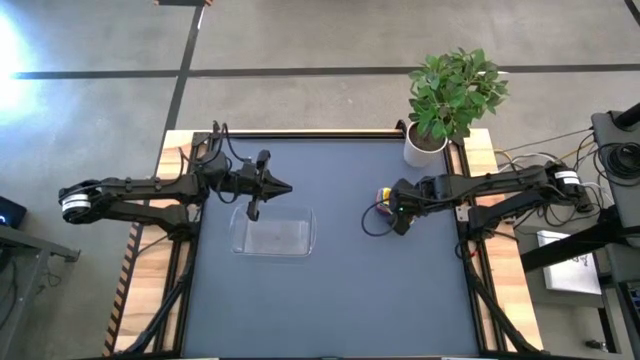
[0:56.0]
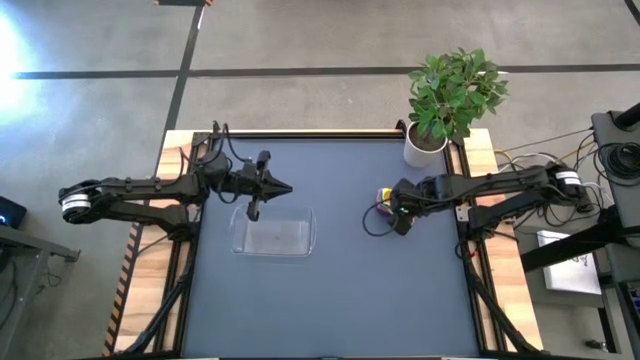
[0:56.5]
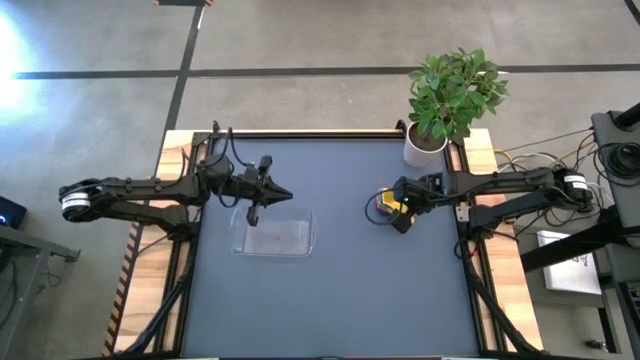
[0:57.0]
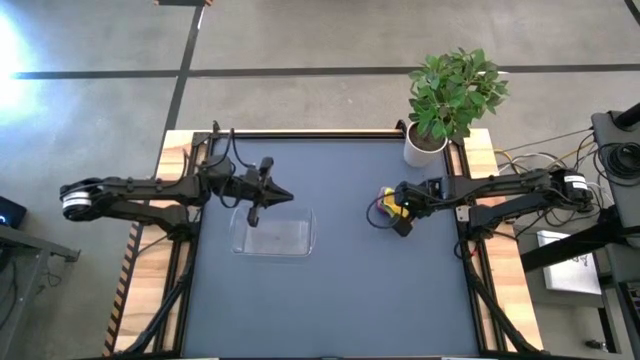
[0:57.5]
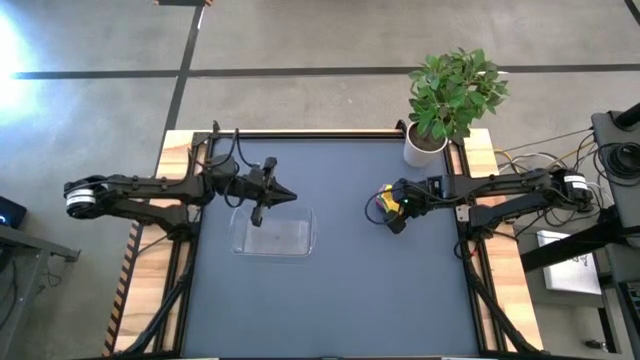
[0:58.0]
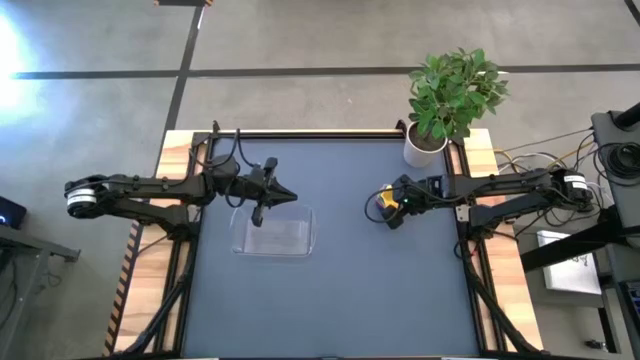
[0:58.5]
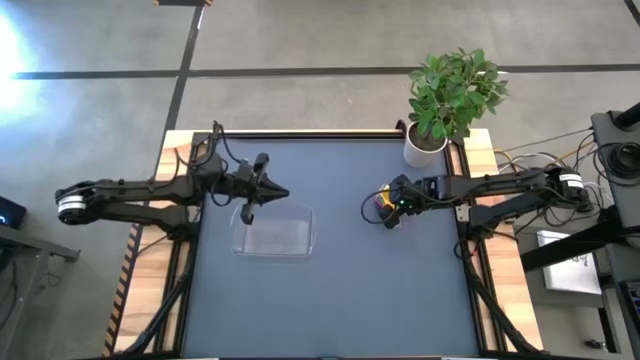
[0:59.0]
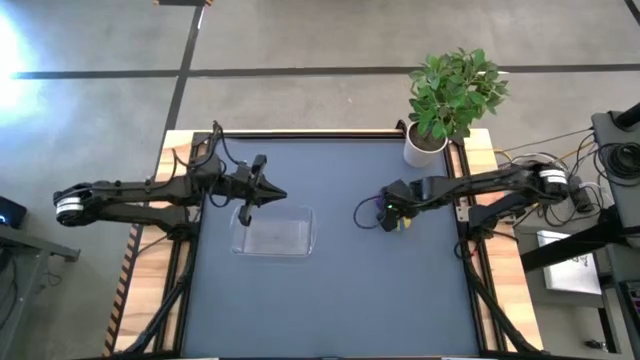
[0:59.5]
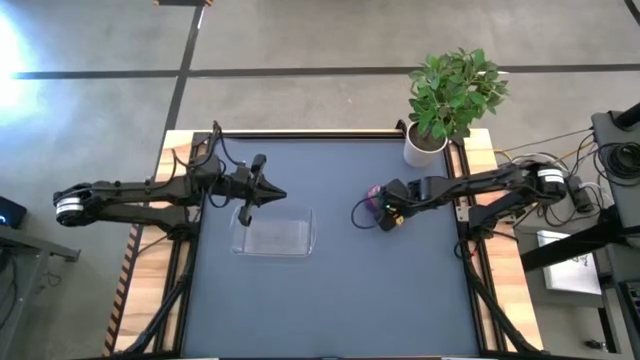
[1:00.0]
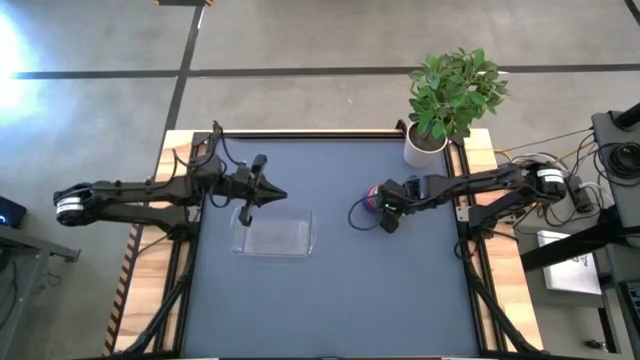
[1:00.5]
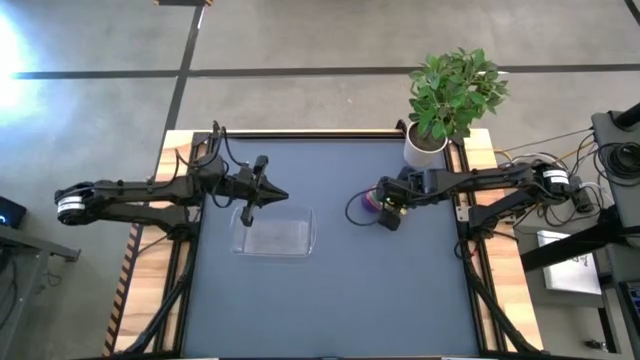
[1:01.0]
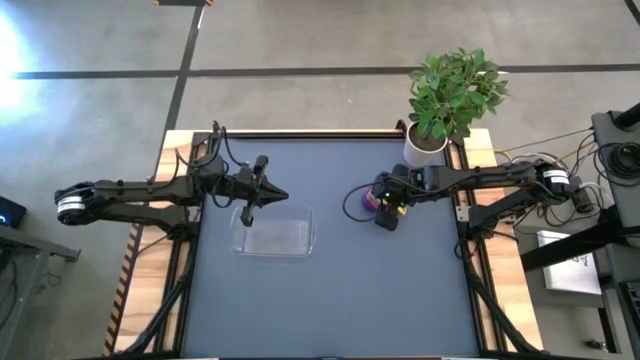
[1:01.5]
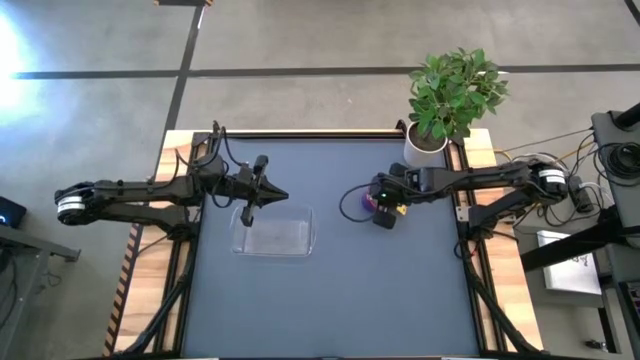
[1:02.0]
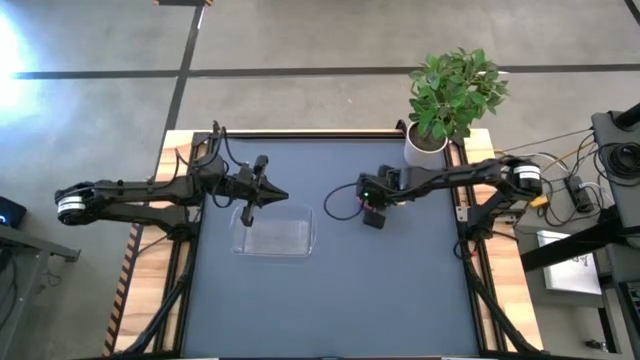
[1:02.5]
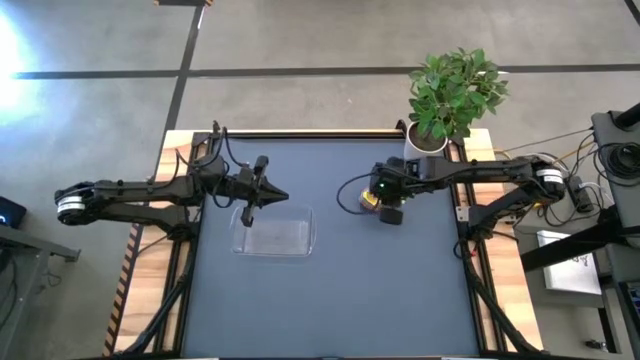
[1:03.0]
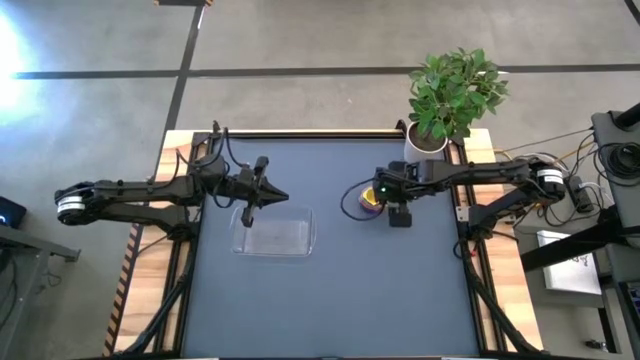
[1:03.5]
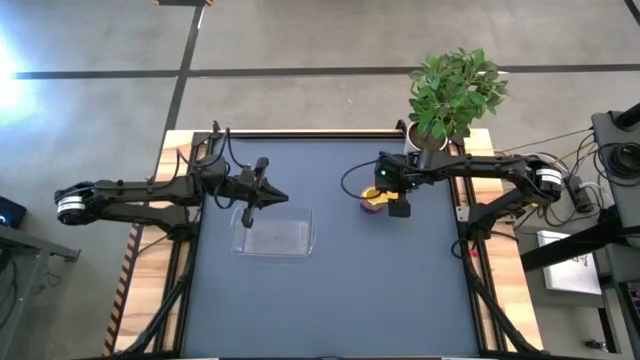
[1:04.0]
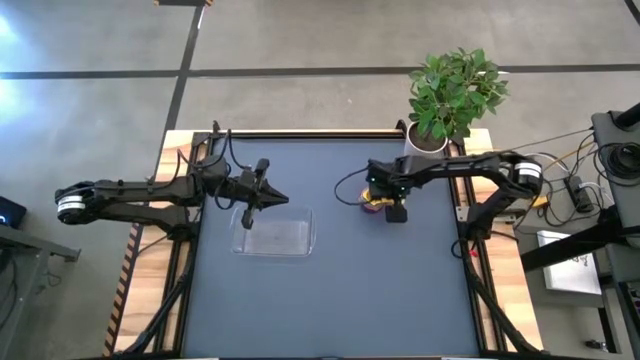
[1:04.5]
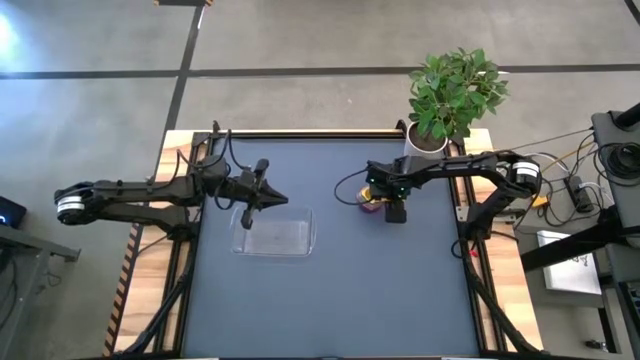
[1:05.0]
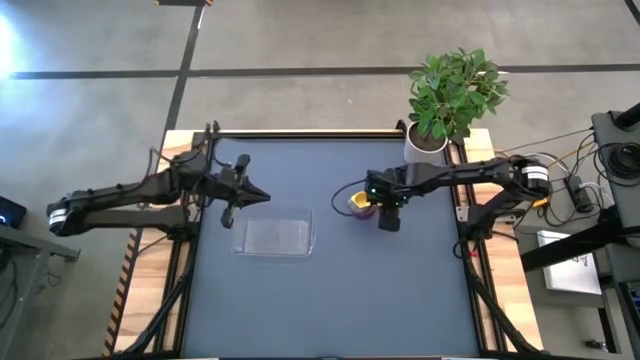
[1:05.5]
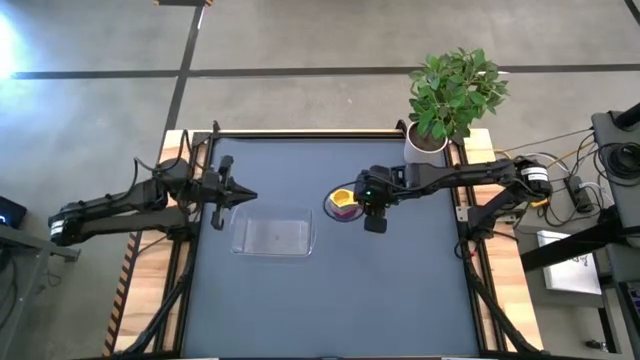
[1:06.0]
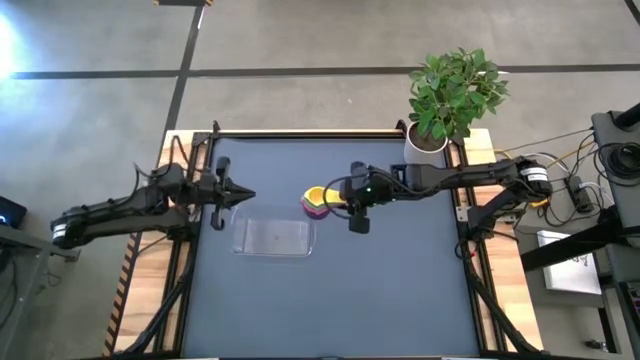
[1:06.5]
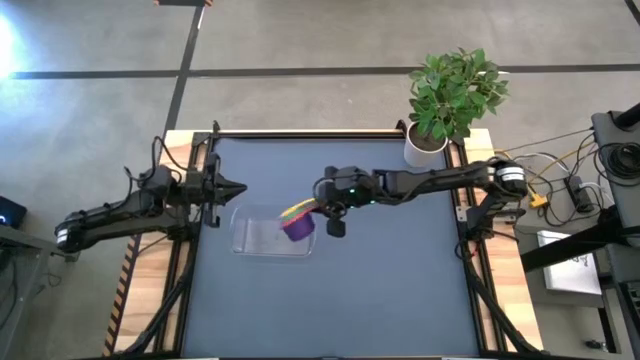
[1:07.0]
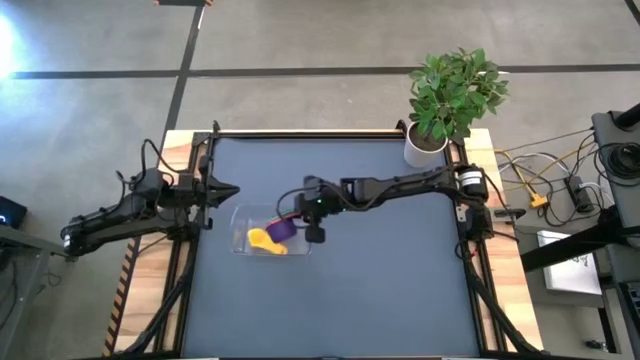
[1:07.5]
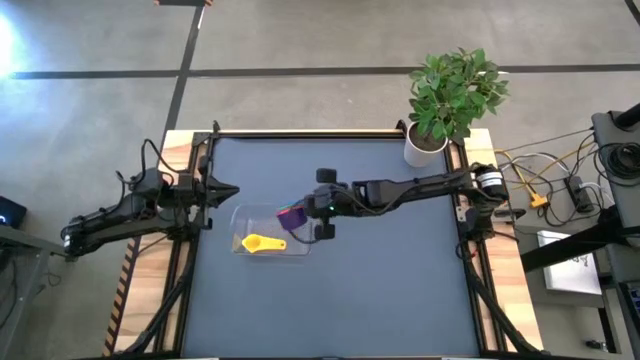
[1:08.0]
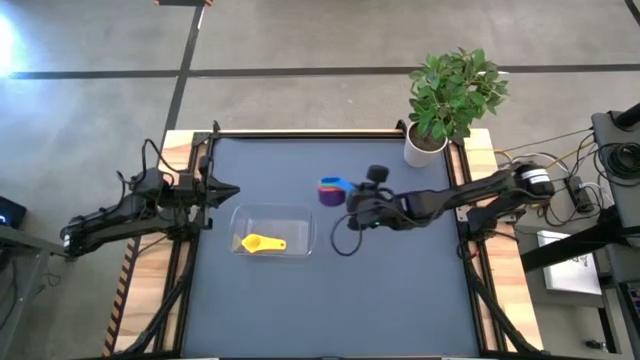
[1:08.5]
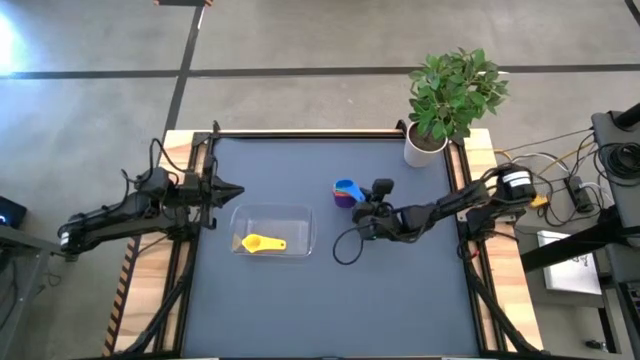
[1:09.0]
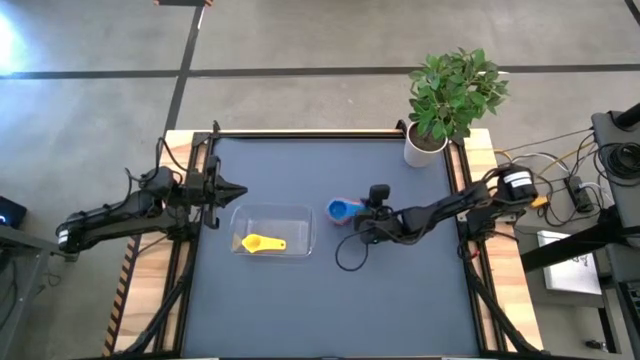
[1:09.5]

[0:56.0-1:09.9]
Task: Nest measuring cups in basket
Put the stacked measuring cups into the transparent bin

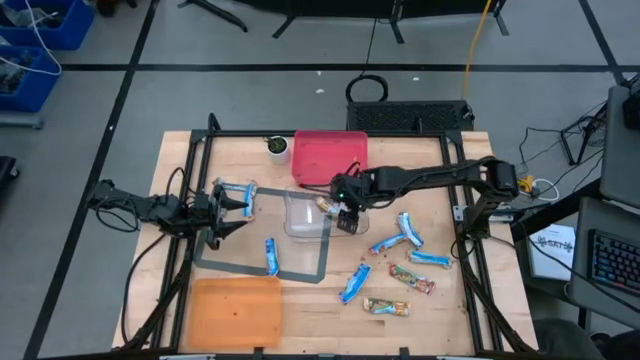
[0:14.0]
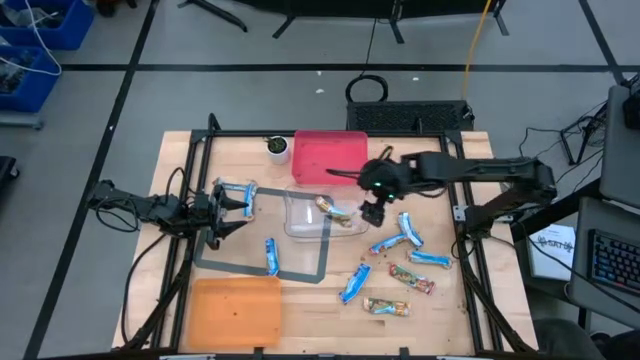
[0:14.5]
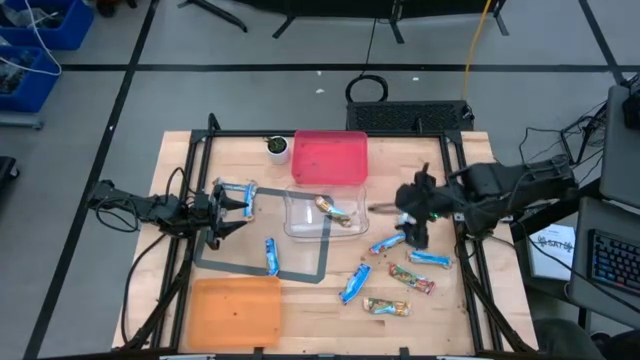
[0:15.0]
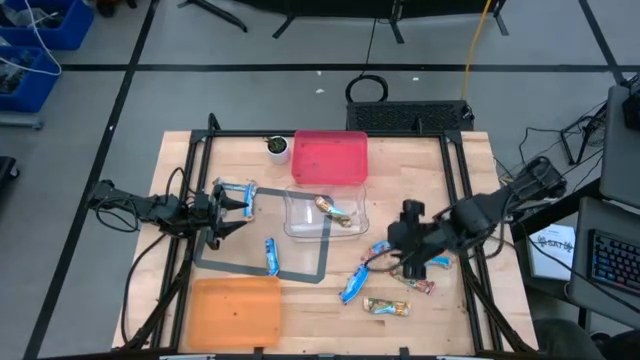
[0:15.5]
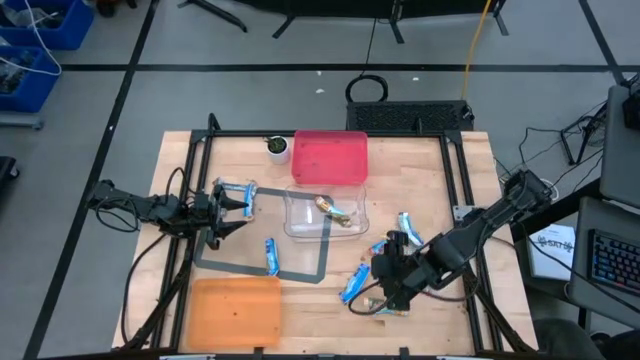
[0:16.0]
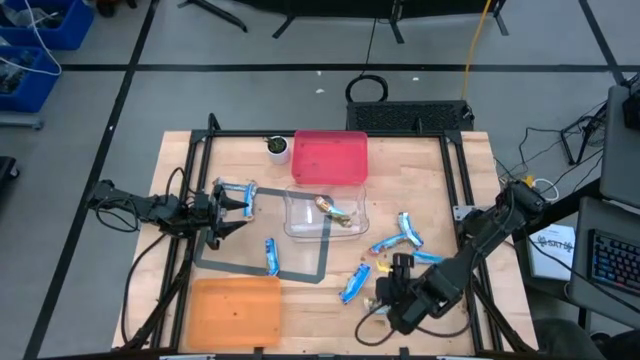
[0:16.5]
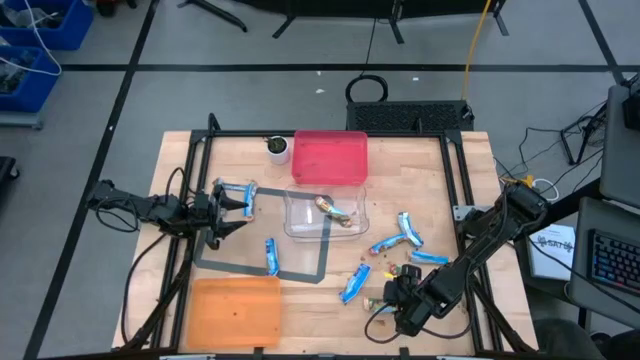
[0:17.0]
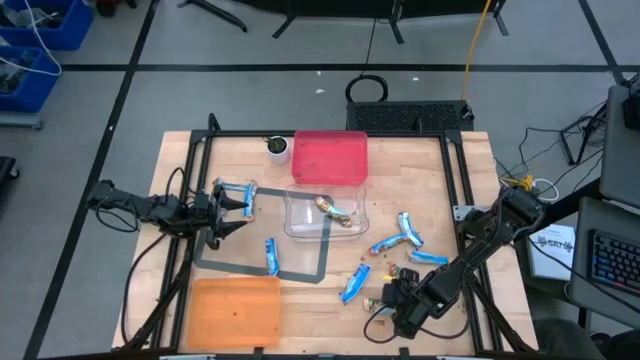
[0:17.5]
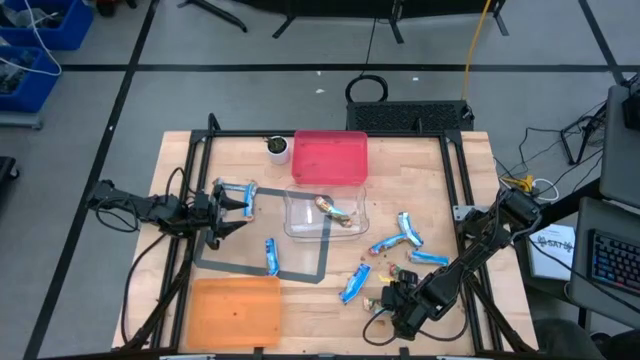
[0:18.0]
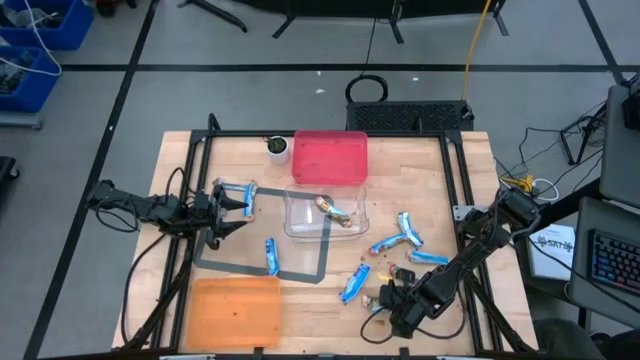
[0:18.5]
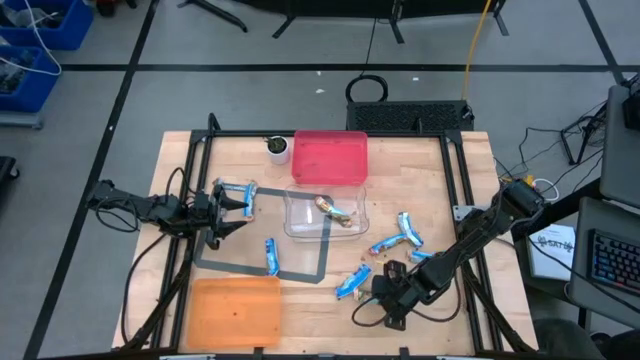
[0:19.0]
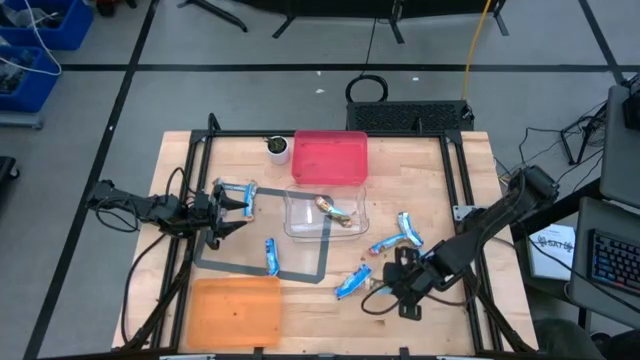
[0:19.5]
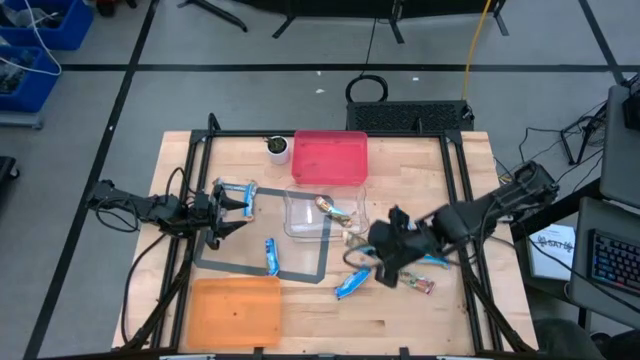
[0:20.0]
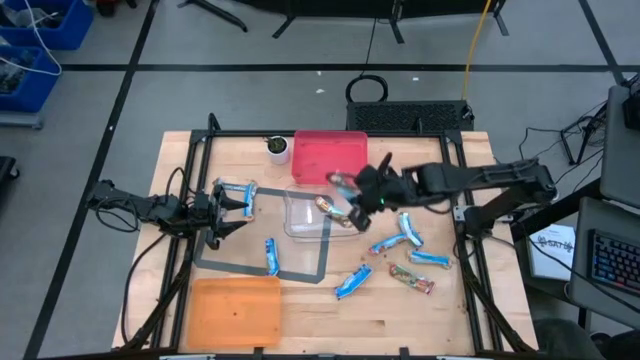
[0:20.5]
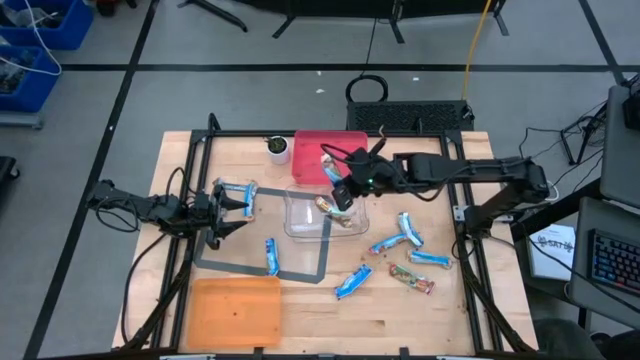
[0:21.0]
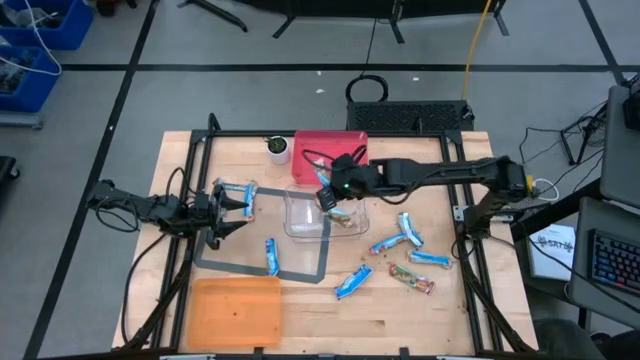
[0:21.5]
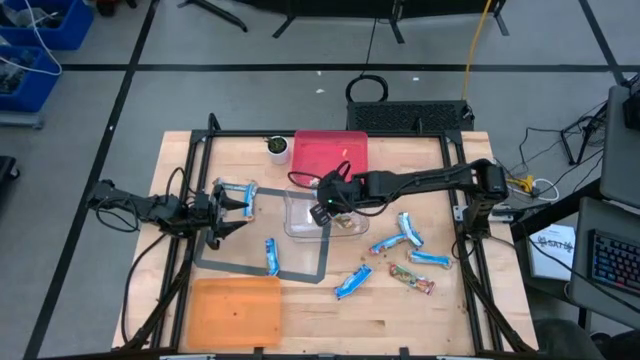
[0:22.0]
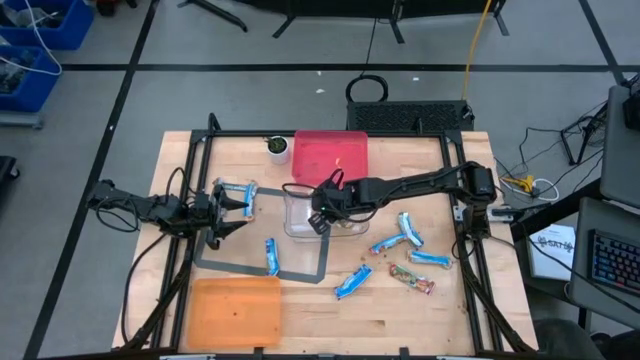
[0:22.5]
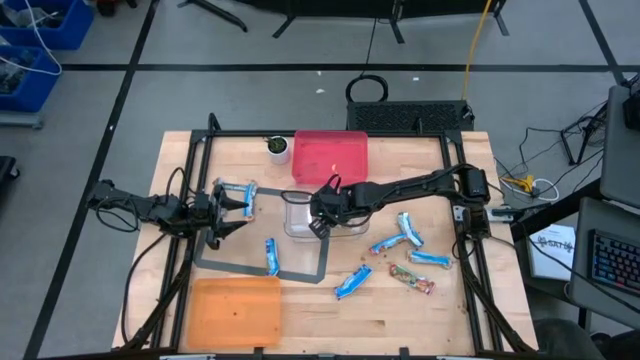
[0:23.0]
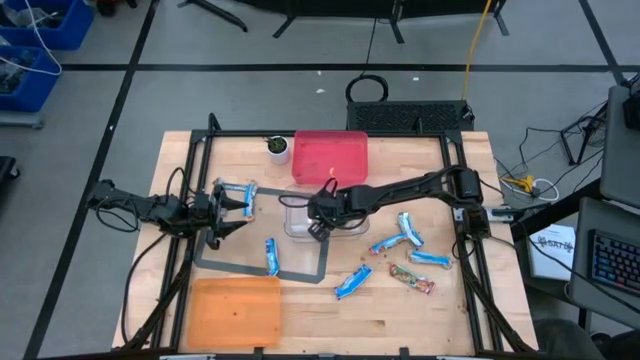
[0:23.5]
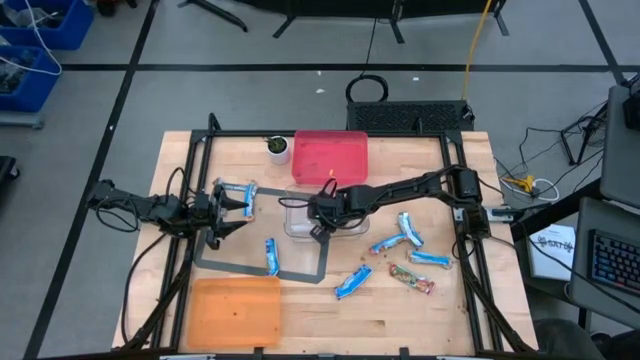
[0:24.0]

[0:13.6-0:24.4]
Task: Pick and place Granola Bars by type
Put the bottom yellow granola bar into the transparent bin
